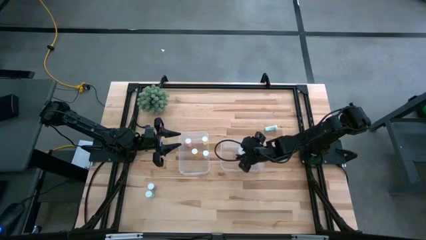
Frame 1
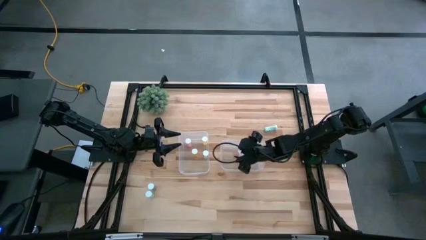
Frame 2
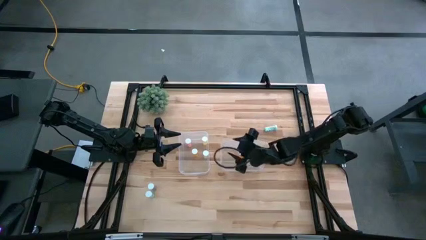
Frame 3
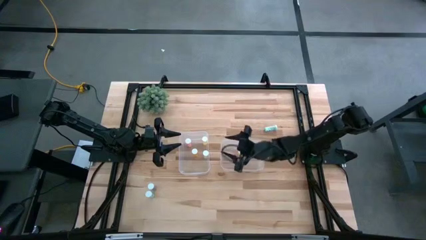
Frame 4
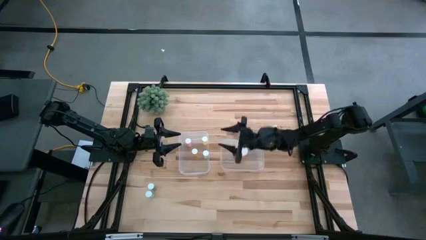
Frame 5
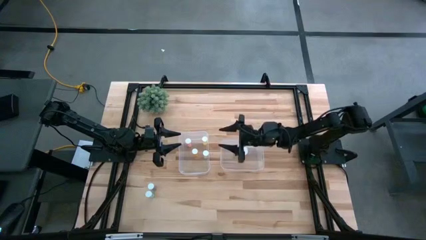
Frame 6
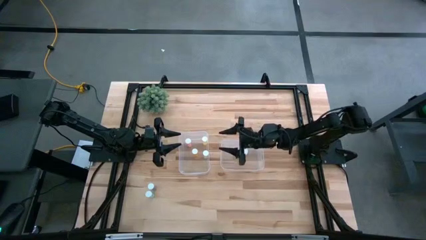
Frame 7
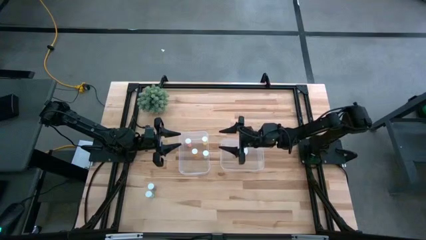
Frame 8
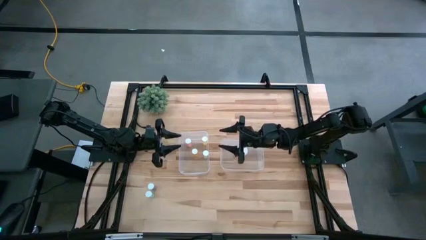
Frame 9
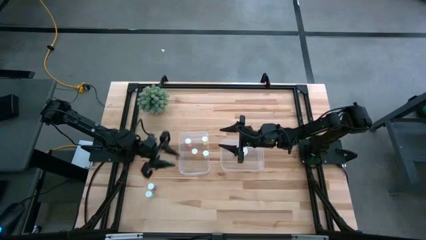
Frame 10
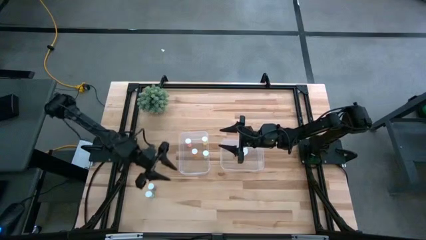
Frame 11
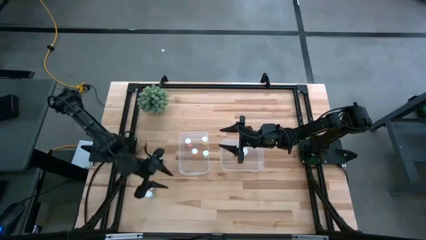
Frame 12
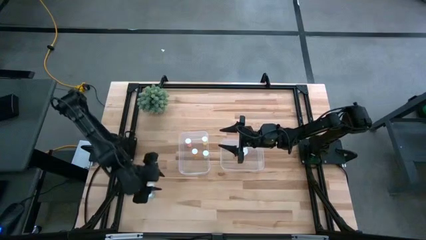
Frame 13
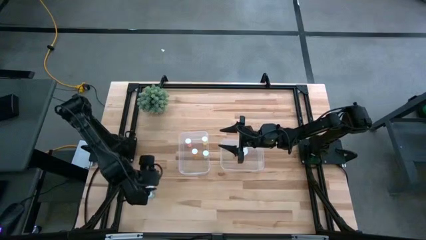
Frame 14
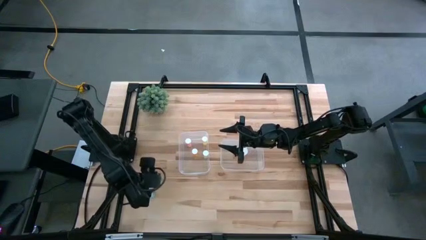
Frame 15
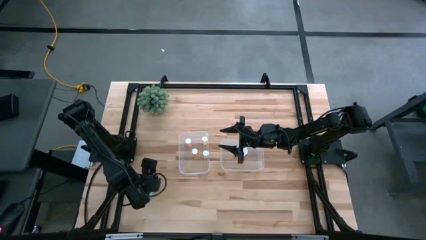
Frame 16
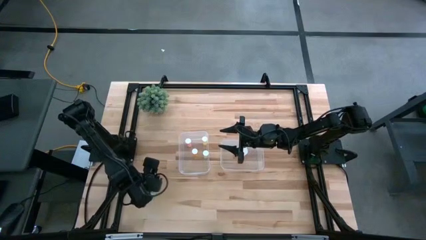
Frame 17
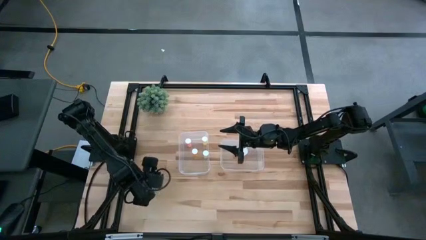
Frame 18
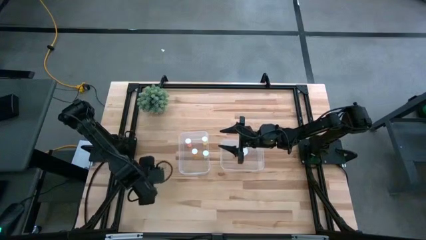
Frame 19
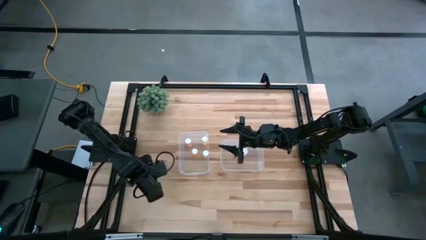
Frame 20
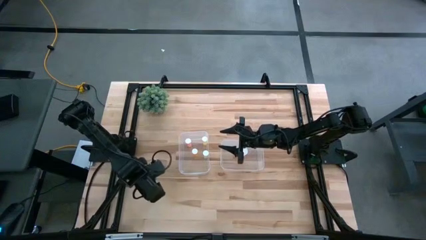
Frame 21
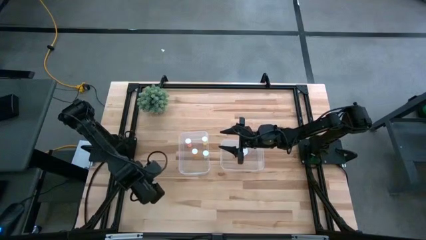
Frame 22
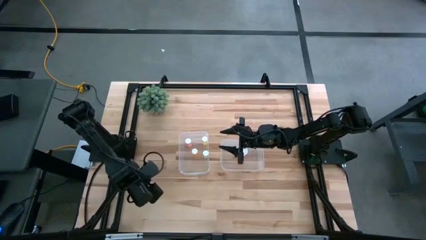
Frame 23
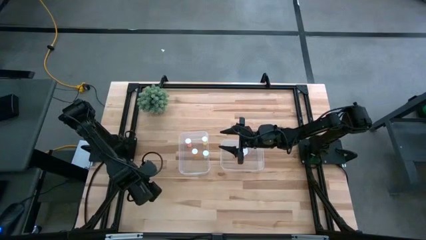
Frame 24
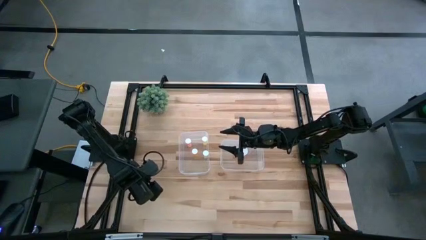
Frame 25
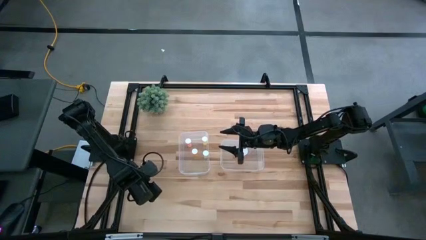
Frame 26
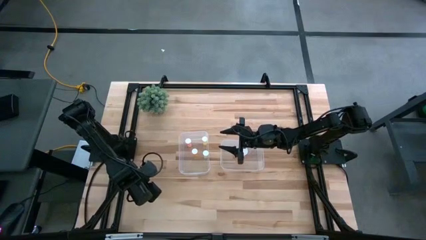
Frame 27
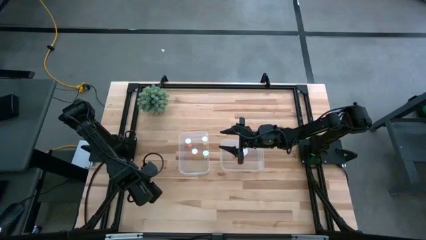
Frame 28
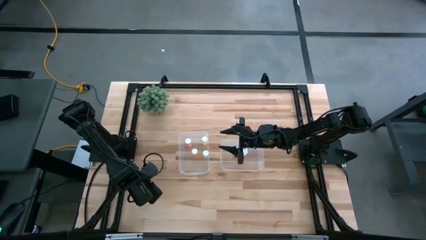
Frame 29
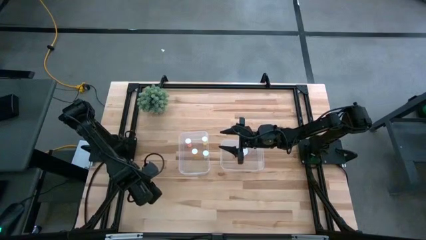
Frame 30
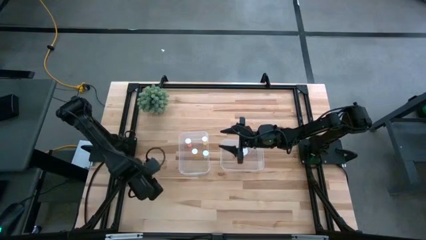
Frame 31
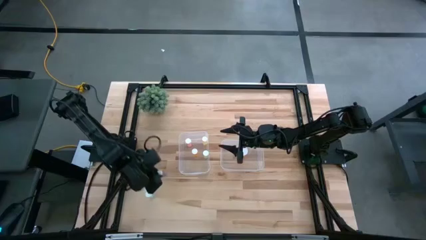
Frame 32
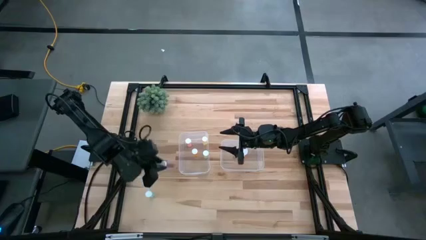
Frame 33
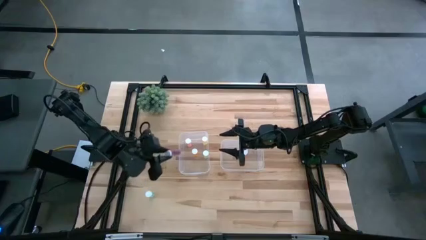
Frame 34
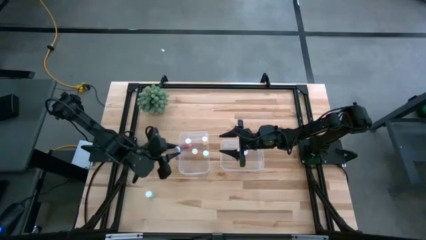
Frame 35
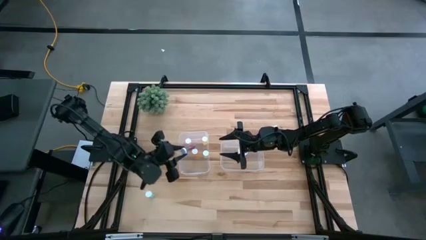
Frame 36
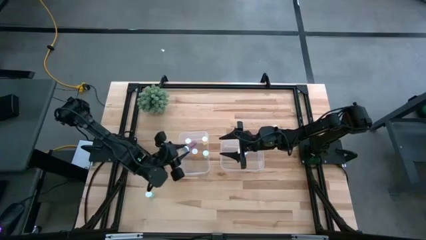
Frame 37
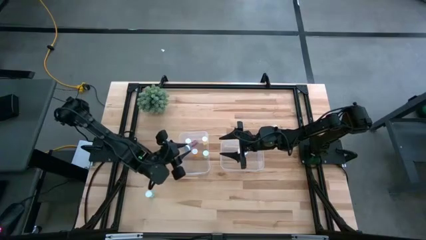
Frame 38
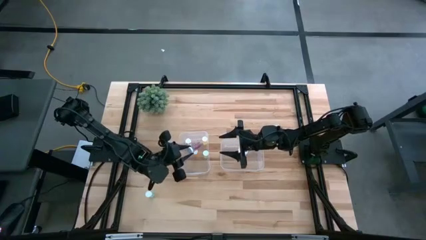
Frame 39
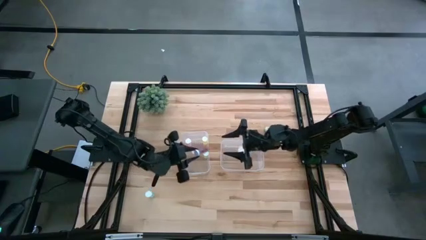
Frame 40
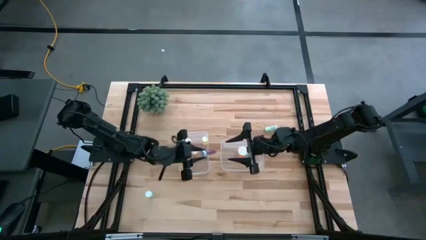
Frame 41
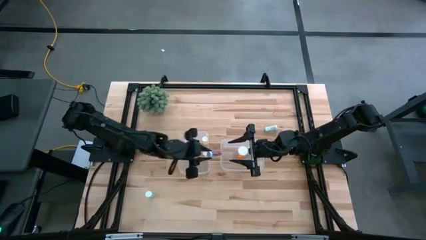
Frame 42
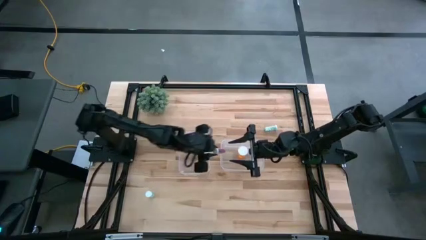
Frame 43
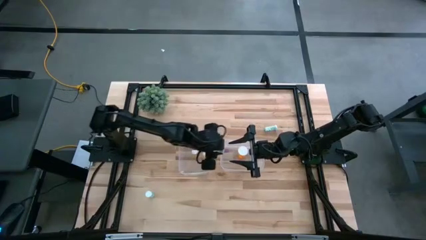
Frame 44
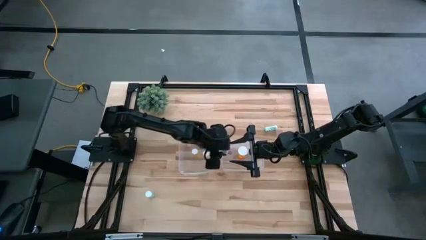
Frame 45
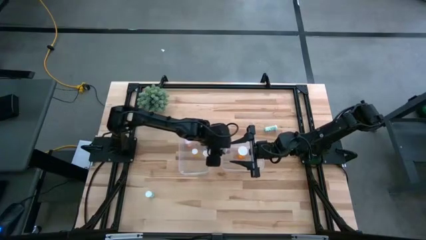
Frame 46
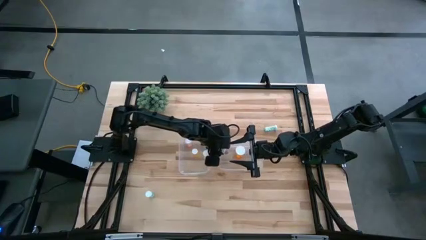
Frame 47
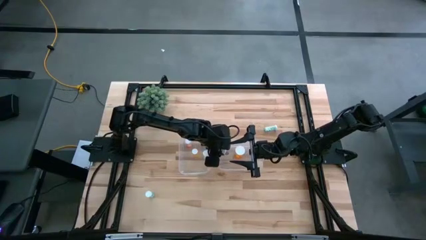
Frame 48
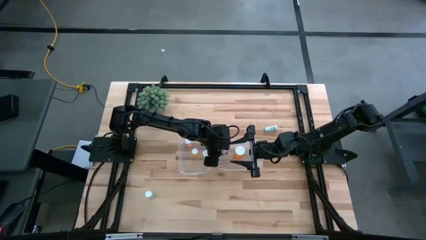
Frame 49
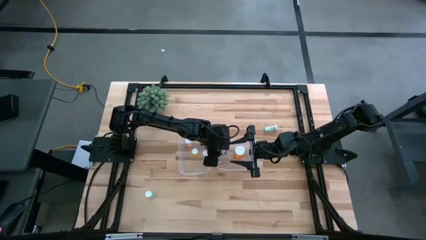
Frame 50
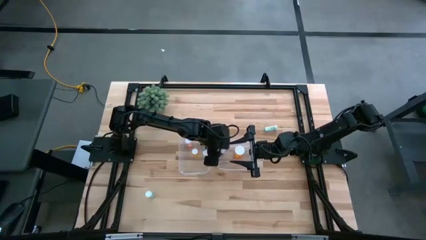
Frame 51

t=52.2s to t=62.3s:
Task: Pick and place medicine bottles into bin by pill shape (circle, oval)
Put the blue capsule bottle into the right transparent bin

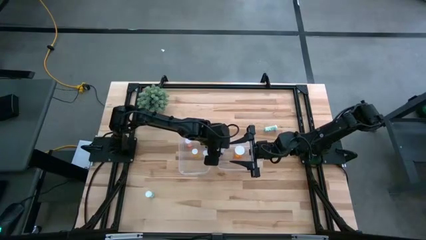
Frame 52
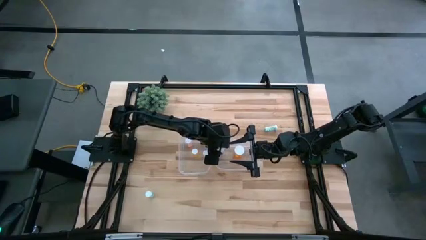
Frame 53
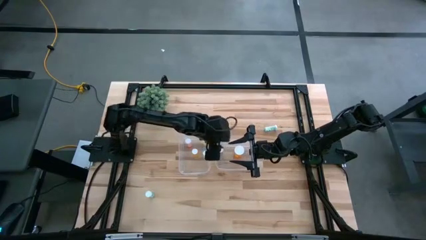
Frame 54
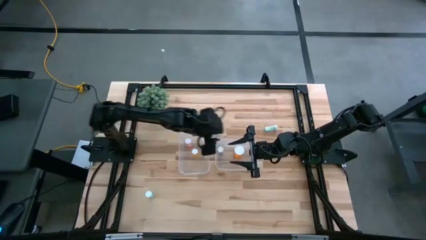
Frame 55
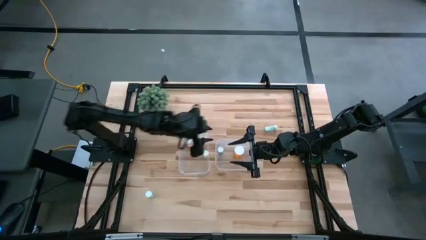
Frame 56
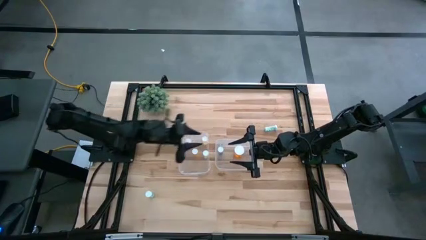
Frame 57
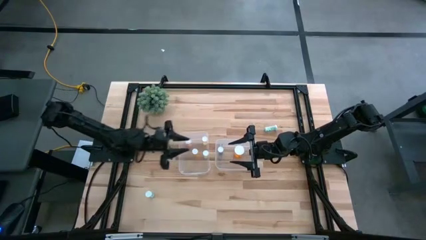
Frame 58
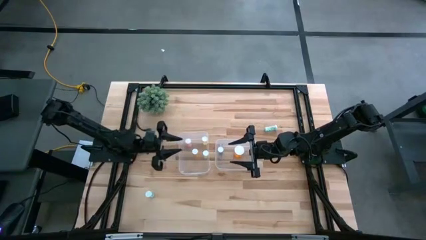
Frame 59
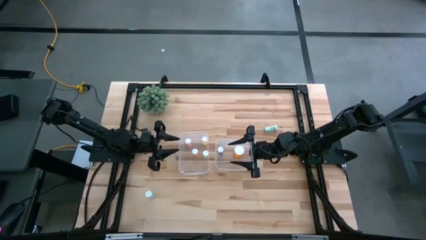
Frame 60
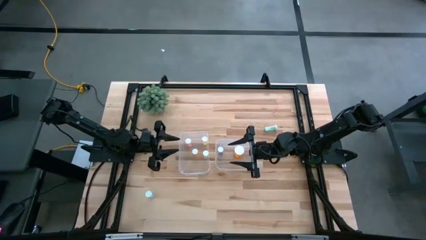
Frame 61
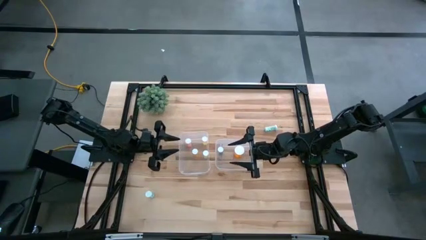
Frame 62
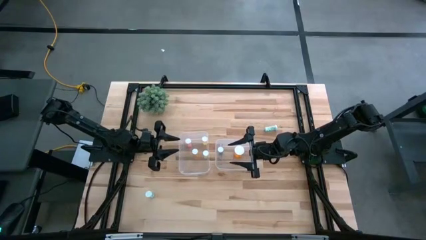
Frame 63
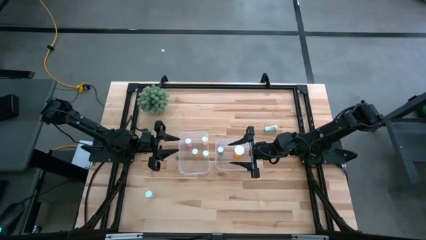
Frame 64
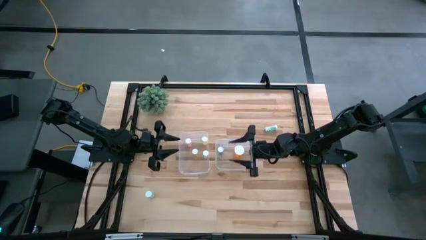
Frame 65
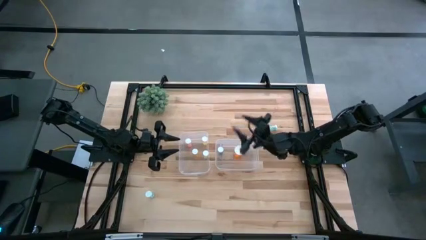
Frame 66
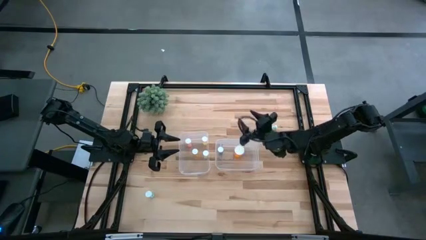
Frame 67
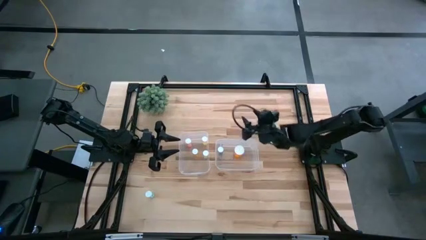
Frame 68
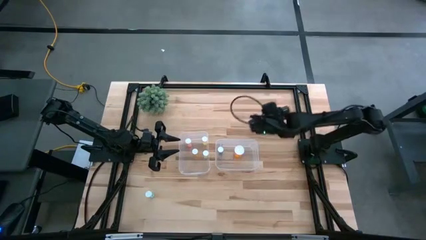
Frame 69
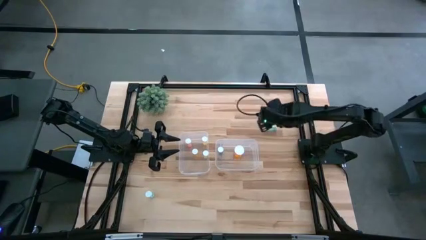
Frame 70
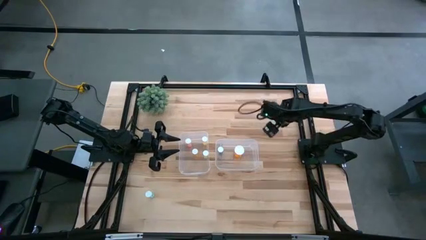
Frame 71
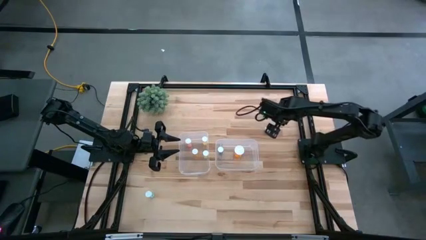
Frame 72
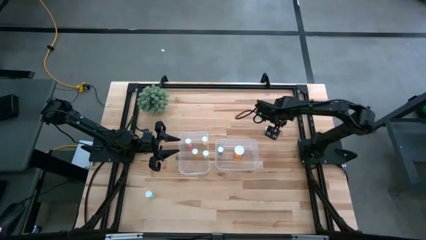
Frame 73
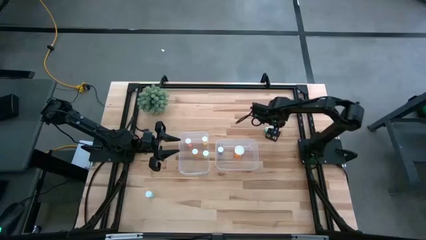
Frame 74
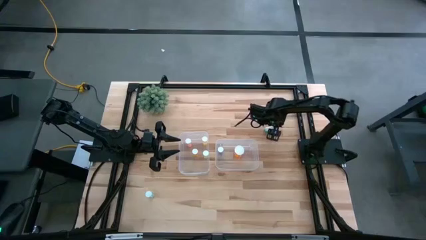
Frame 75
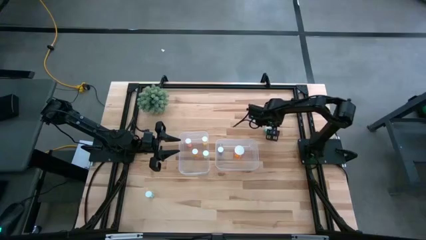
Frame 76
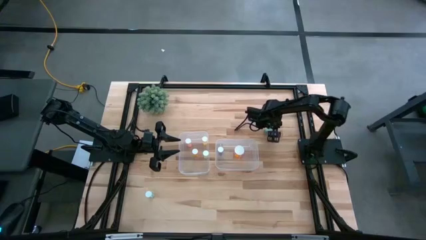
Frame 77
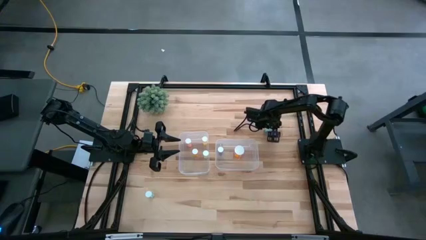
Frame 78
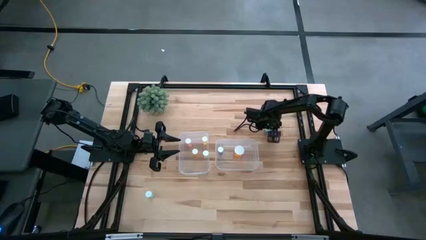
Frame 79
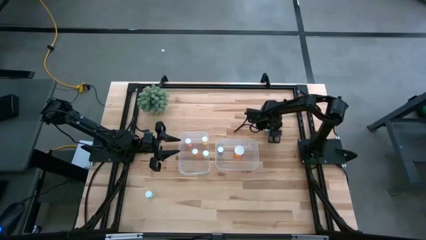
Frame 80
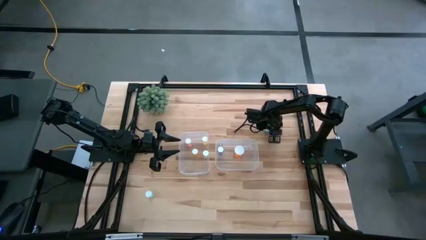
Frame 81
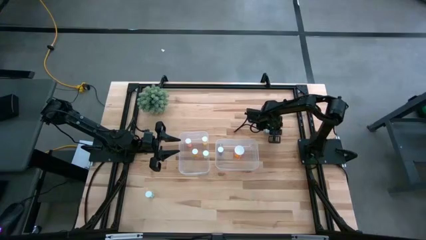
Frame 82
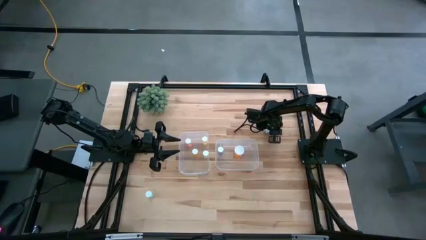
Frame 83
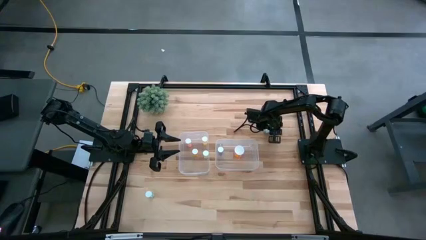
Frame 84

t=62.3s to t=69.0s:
Put the top green tablet bottle into the left transparent bin
